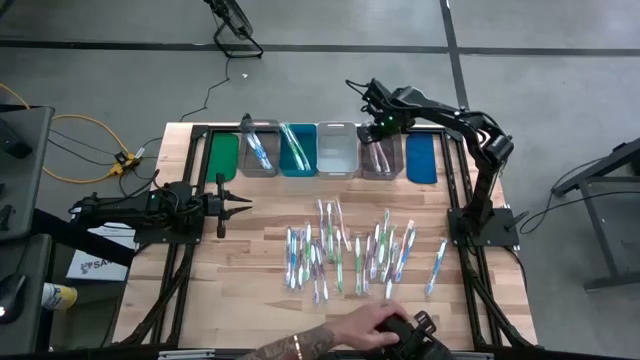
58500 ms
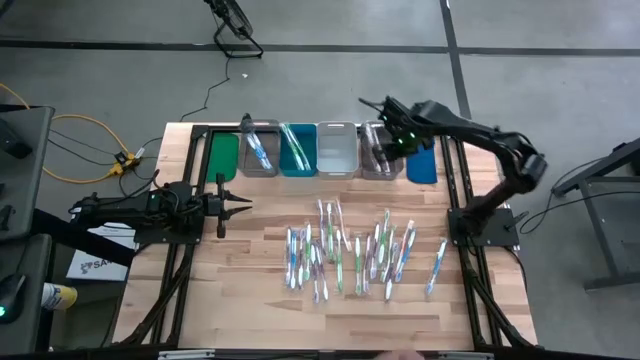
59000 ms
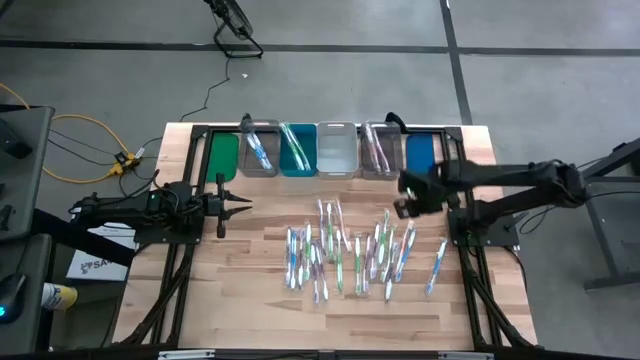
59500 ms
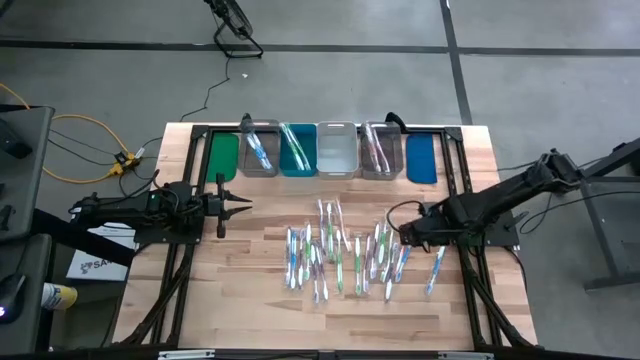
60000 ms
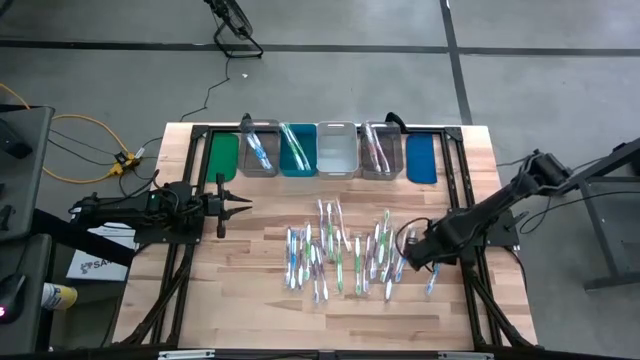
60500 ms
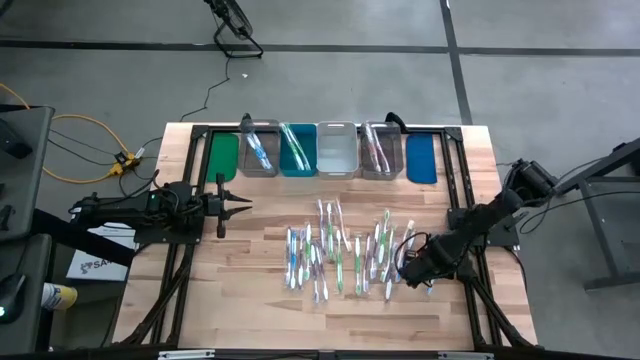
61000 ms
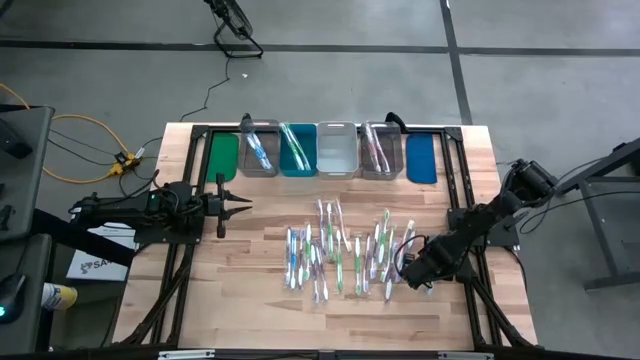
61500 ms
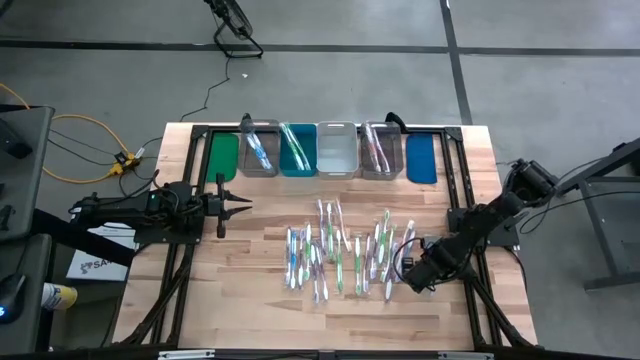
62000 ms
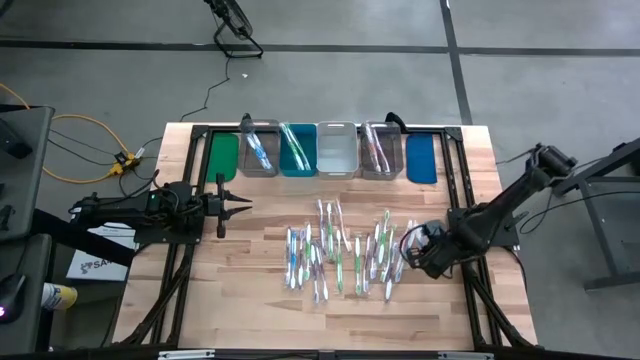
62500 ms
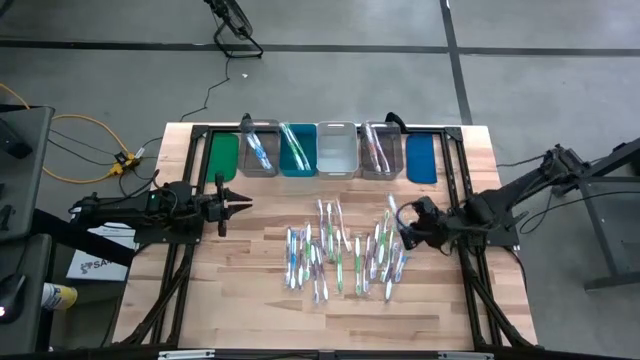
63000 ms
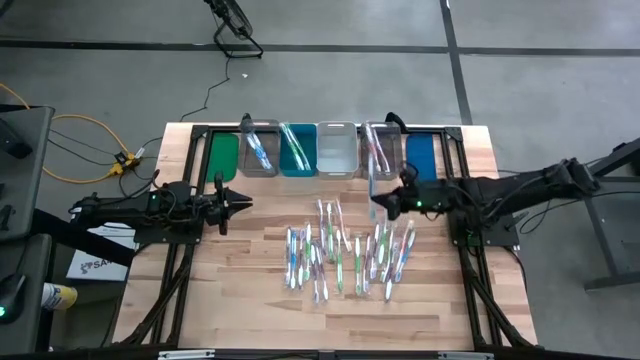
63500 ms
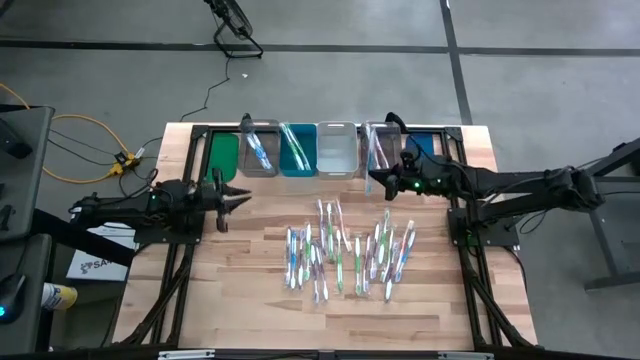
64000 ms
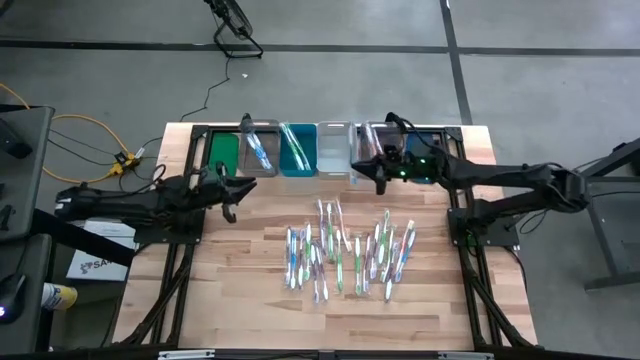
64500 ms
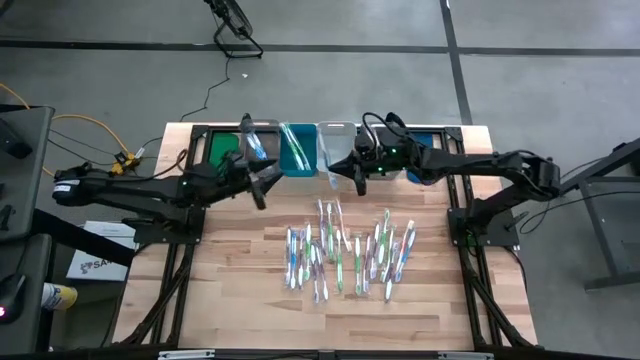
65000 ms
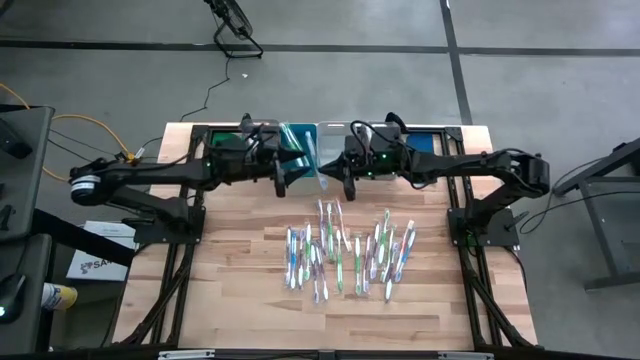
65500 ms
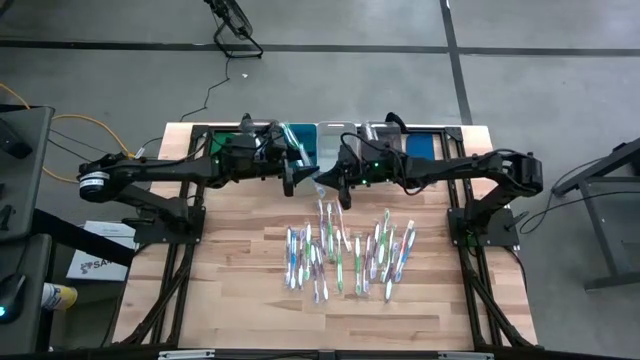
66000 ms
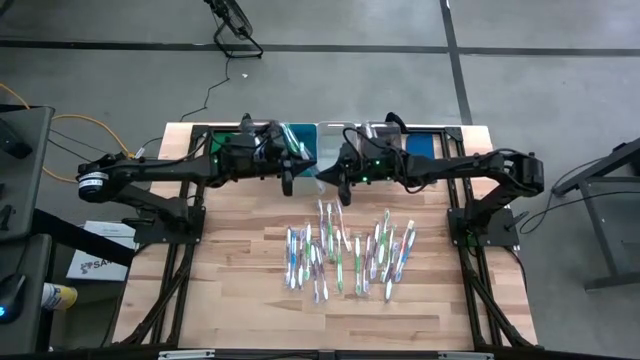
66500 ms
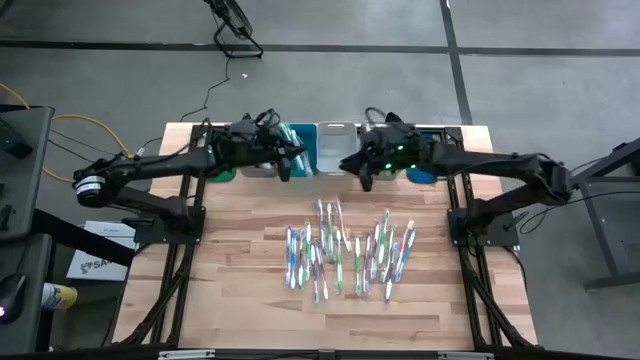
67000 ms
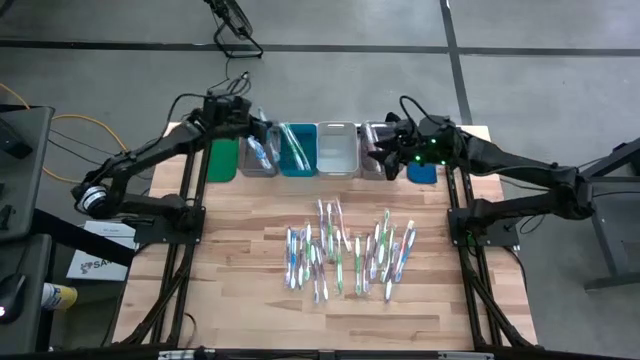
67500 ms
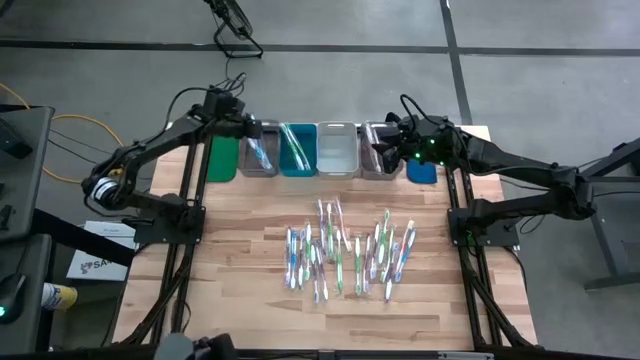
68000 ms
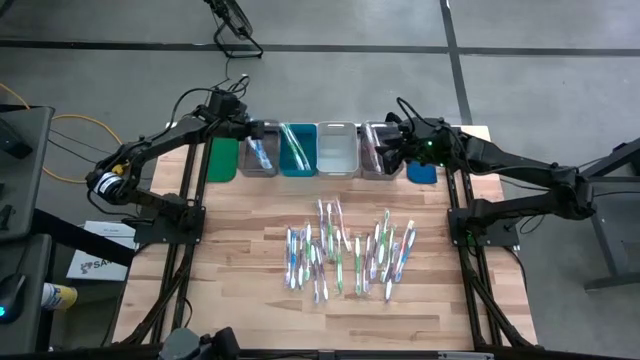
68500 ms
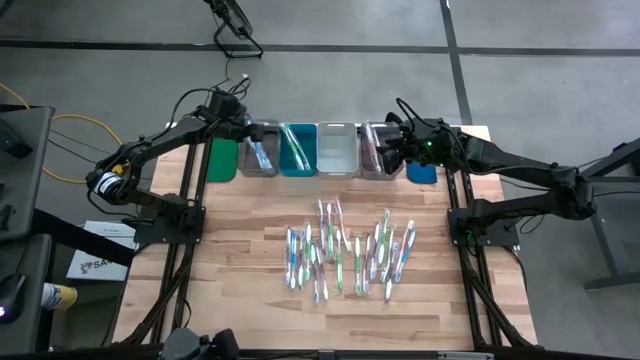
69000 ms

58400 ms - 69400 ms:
Task: Pick & Place Toothbrushes
Put the blue toothbrush into the left black bin

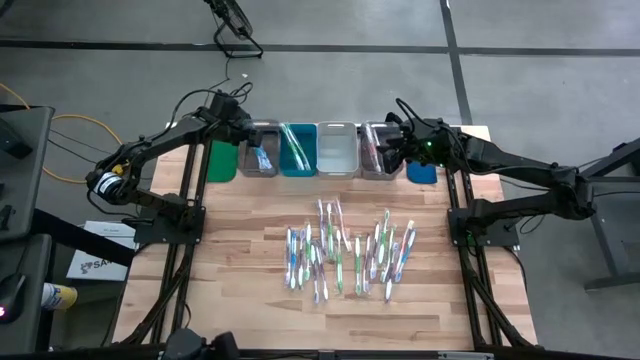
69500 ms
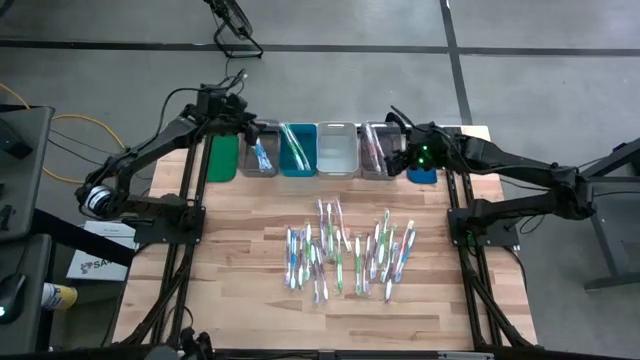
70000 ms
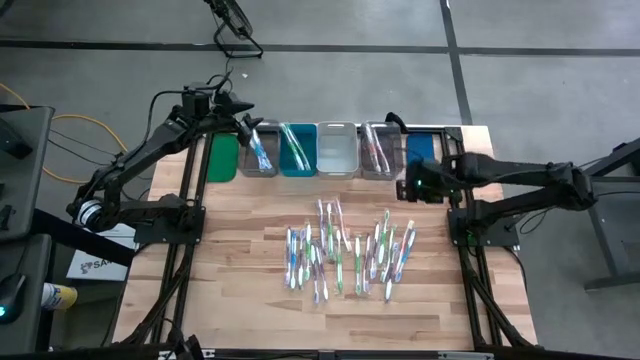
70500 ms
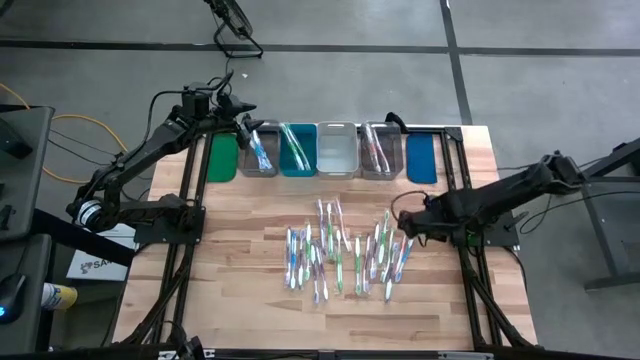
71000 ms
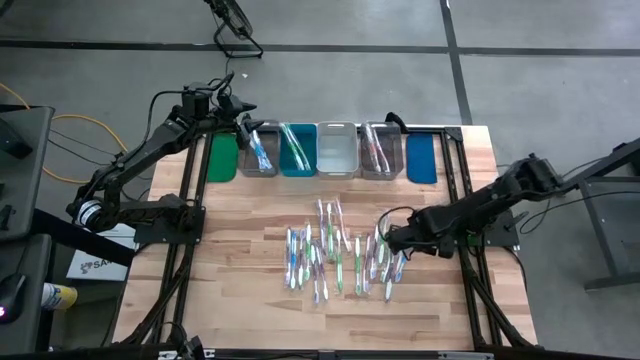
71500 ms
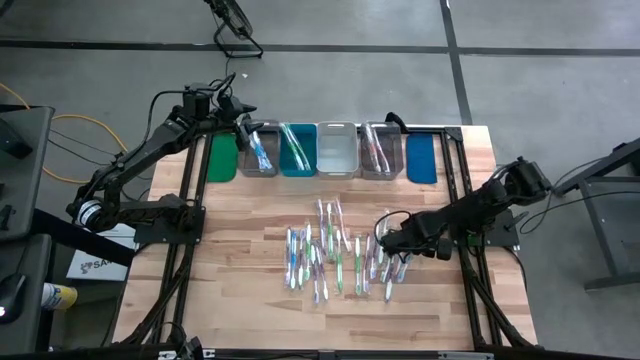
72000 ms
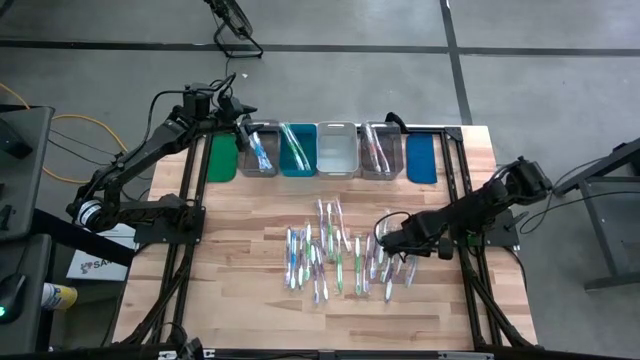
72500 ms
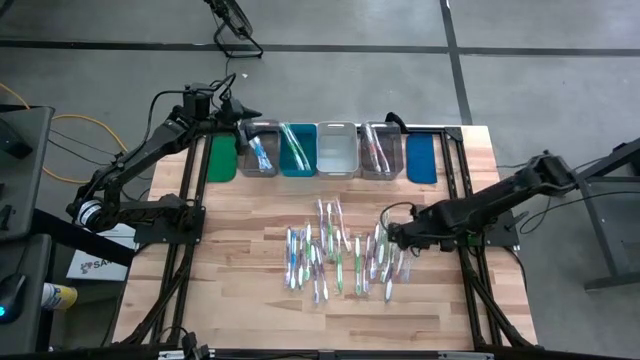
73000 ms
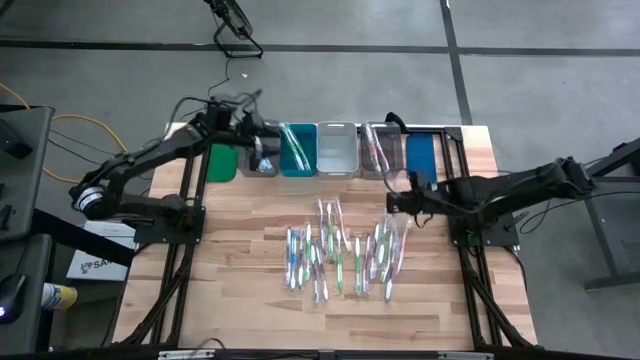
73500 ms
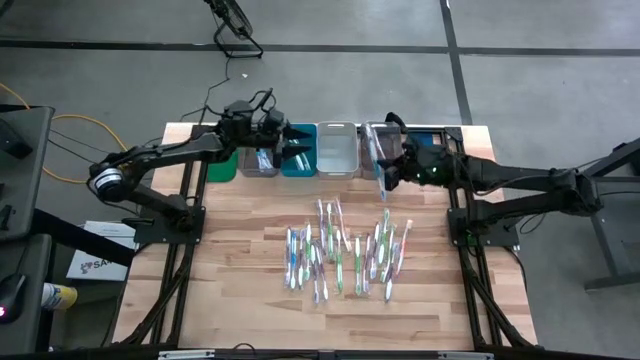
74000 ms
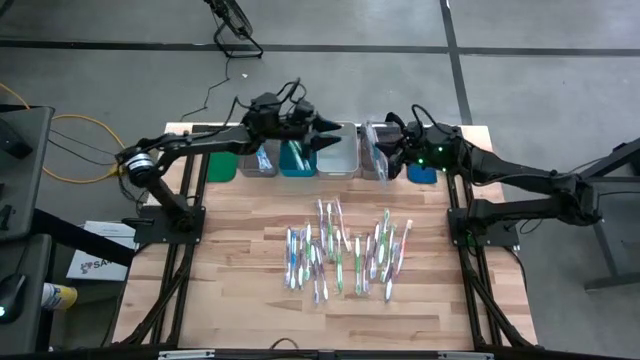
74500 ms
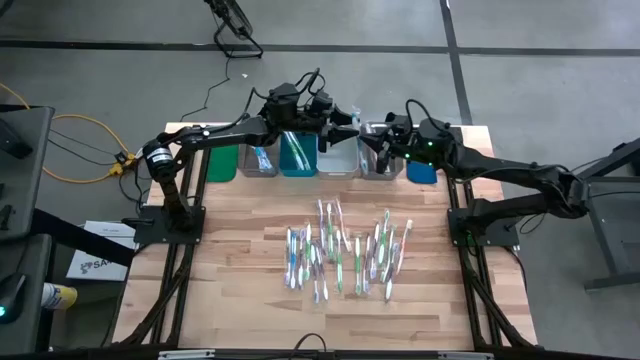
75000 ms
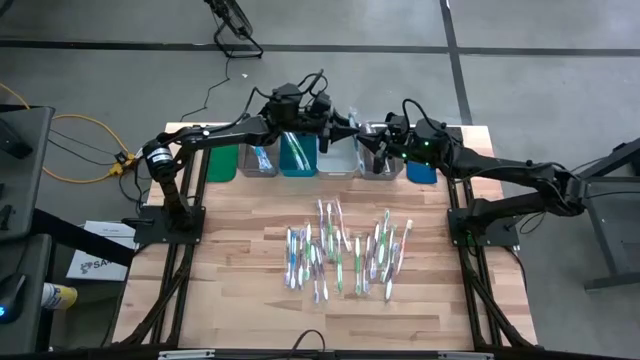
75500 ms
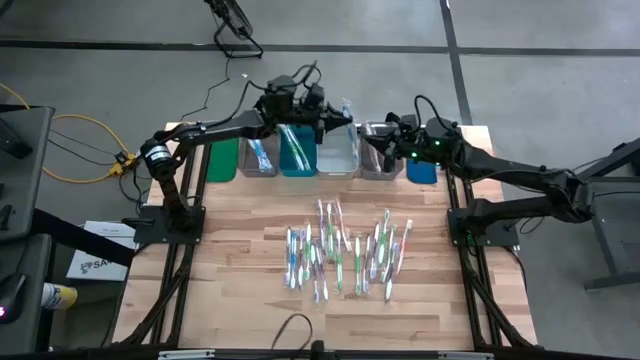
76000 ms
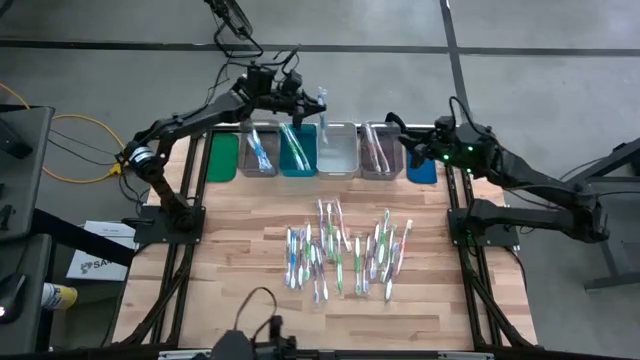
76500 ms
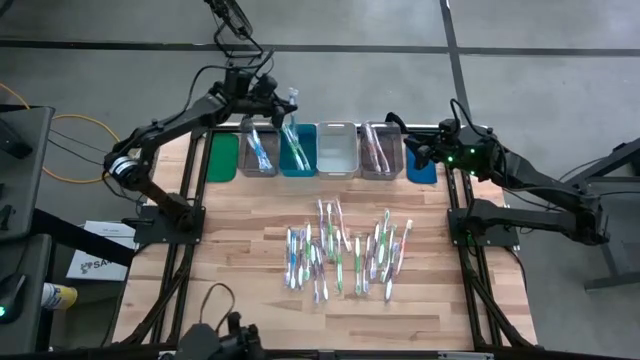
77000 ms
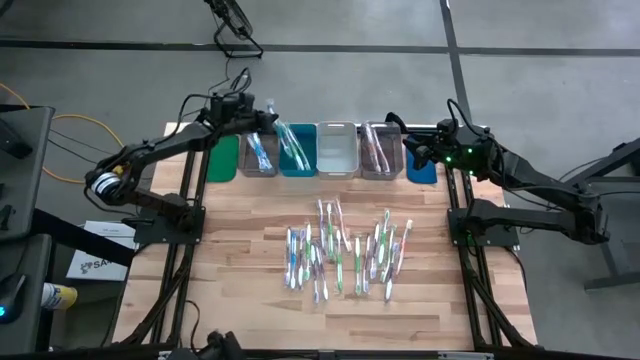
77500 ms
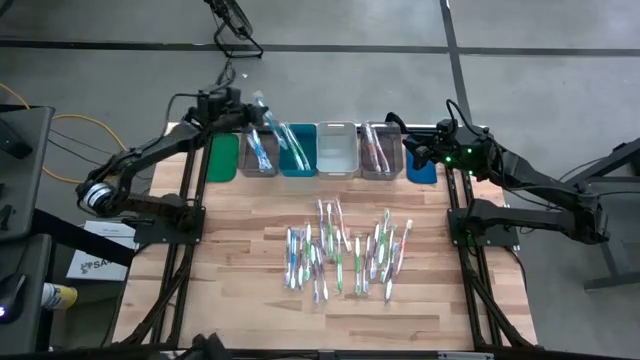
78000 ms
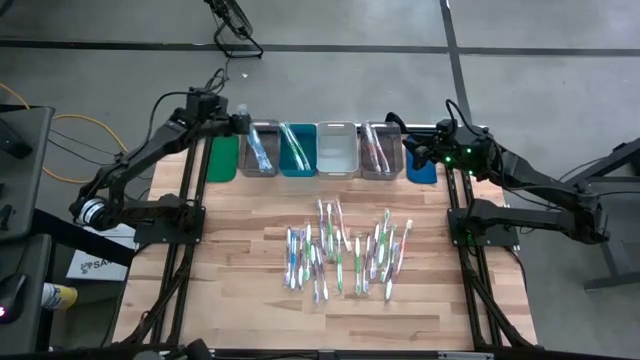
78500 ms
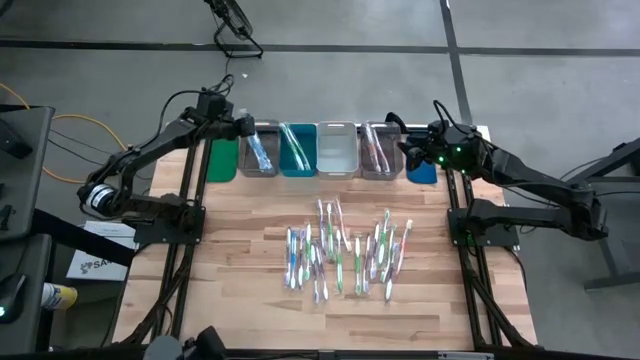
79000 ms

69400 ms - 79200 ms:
Put the blue toothbrush into the left black bin

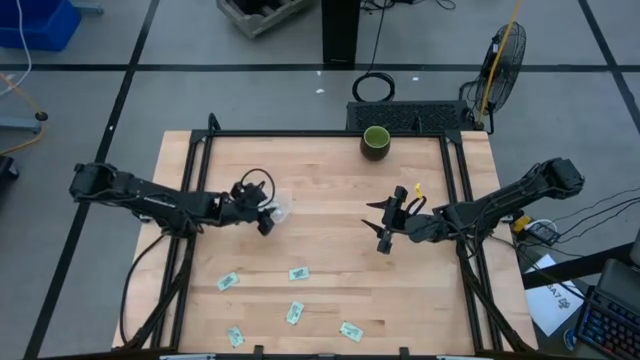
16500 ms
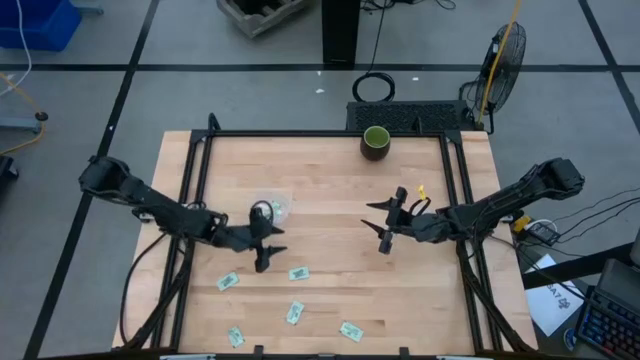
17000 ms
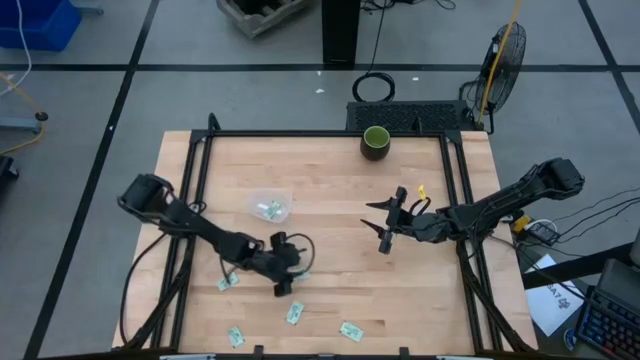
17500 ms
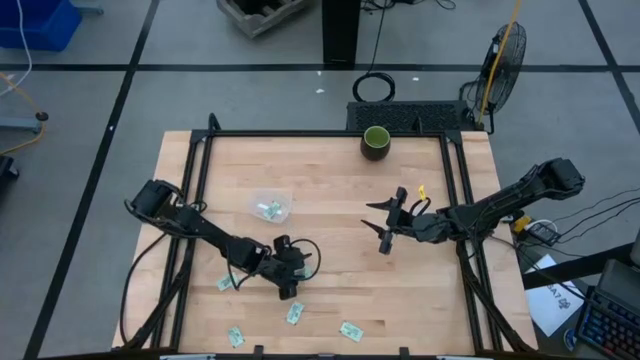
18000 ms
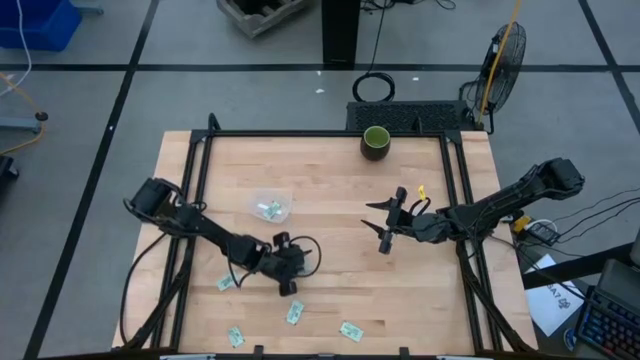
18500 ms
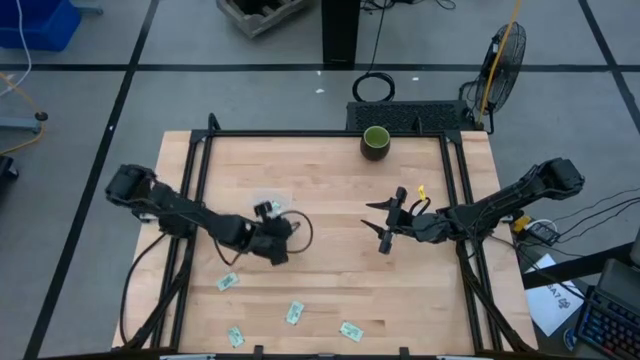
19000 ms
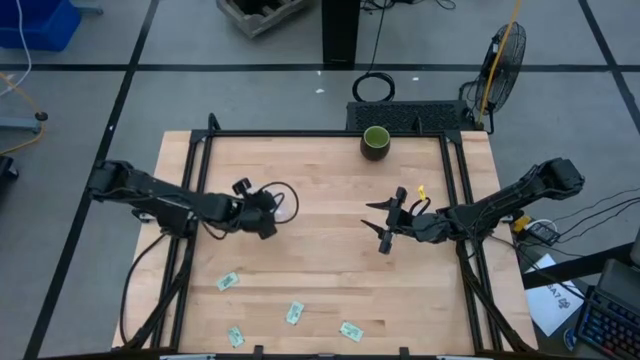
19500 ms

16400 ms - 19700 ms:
Task: Pick and place Stevia / Truvia into bins
Put the white stevia packet into the transparent rectangular container
